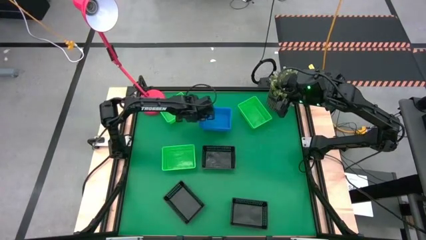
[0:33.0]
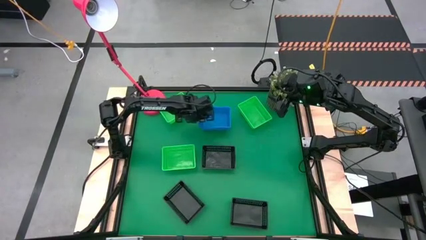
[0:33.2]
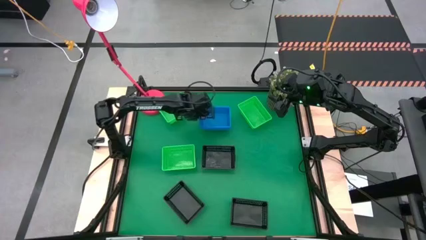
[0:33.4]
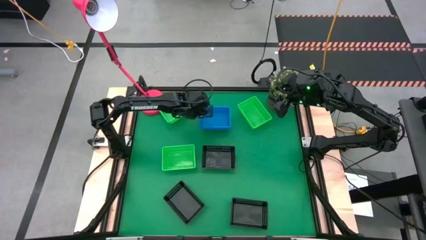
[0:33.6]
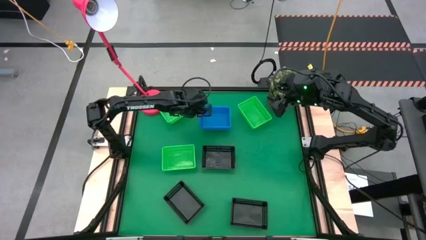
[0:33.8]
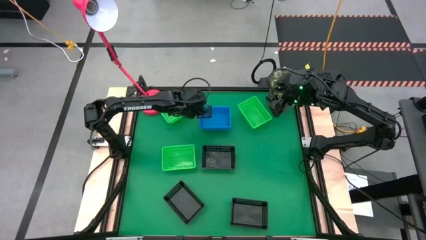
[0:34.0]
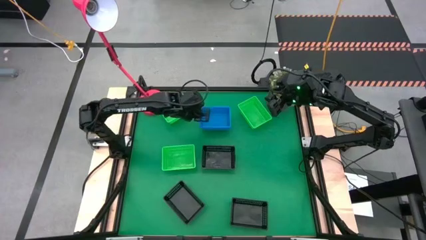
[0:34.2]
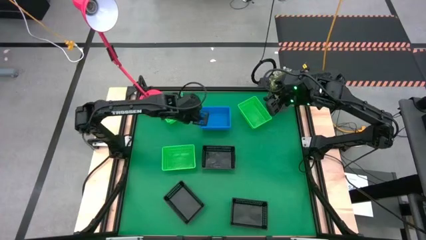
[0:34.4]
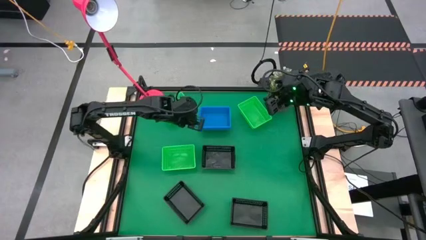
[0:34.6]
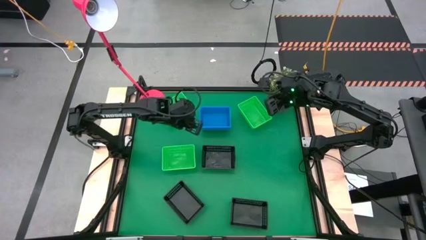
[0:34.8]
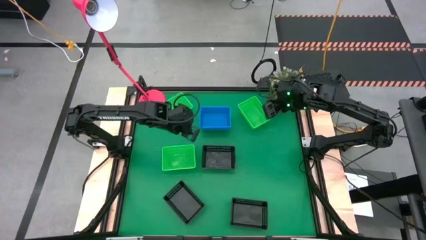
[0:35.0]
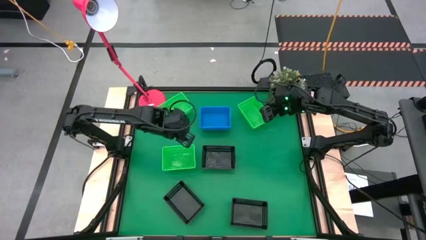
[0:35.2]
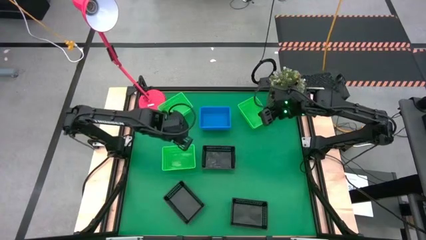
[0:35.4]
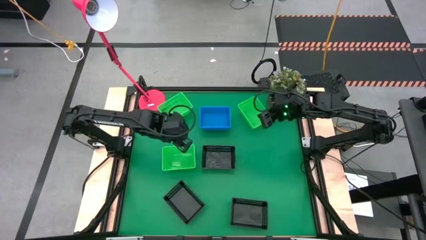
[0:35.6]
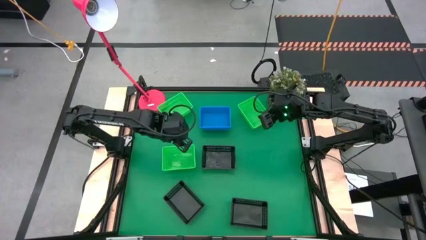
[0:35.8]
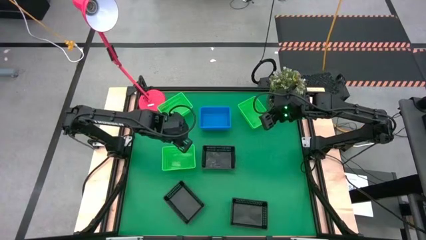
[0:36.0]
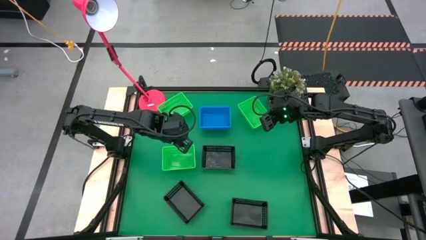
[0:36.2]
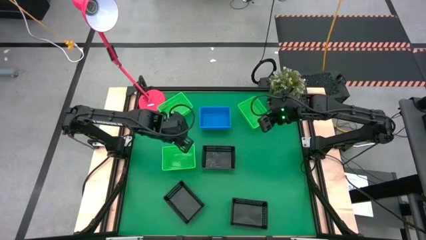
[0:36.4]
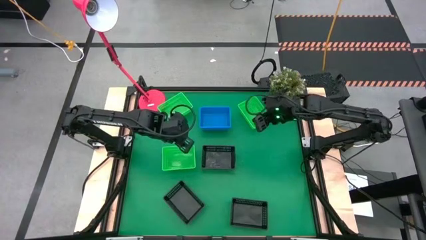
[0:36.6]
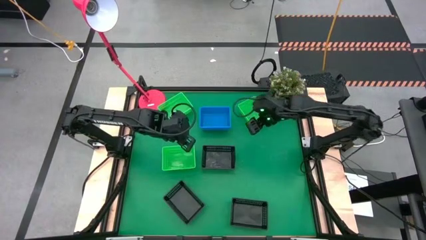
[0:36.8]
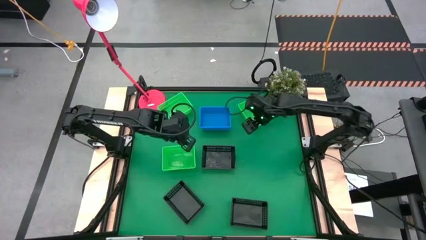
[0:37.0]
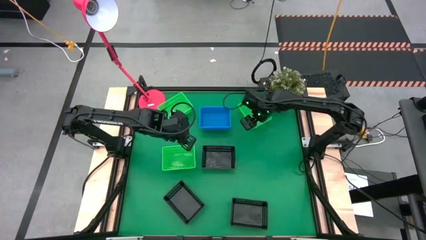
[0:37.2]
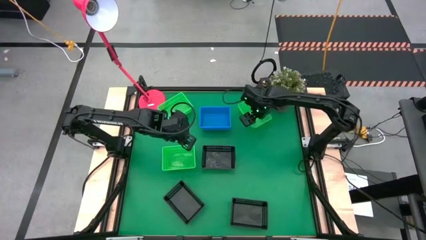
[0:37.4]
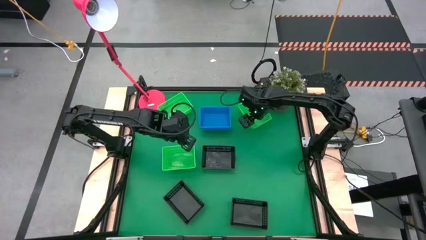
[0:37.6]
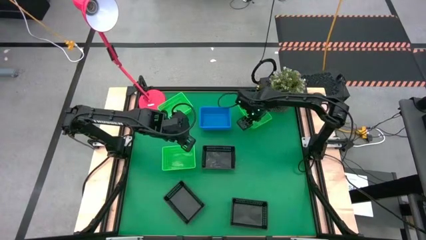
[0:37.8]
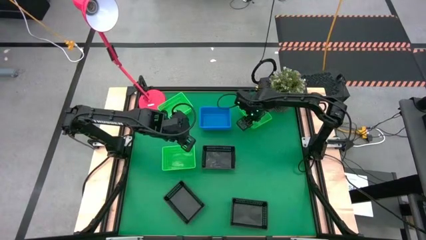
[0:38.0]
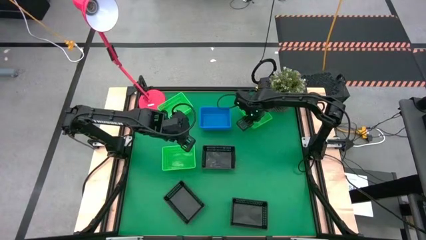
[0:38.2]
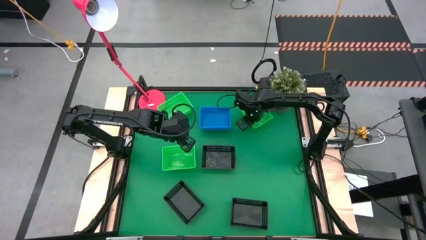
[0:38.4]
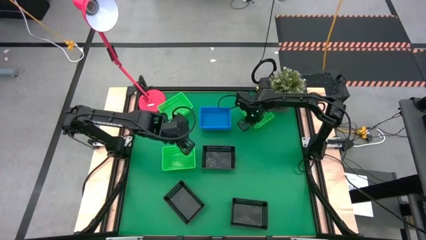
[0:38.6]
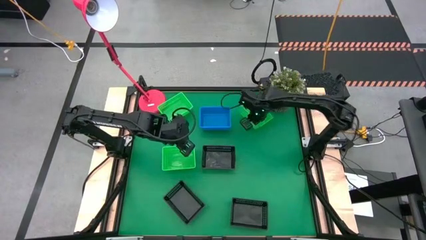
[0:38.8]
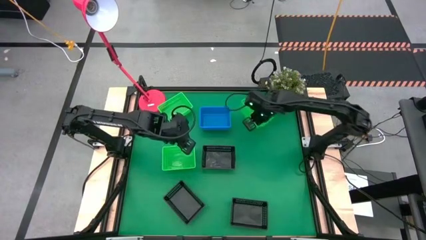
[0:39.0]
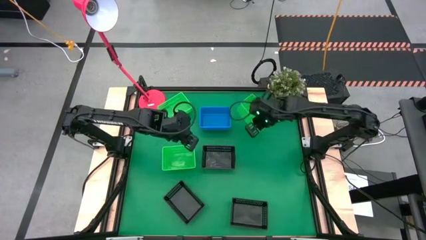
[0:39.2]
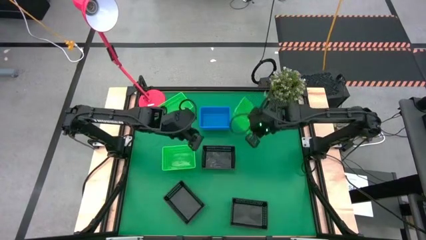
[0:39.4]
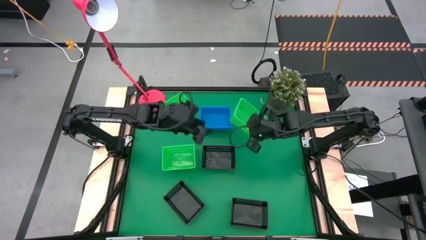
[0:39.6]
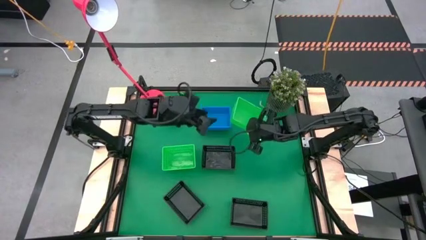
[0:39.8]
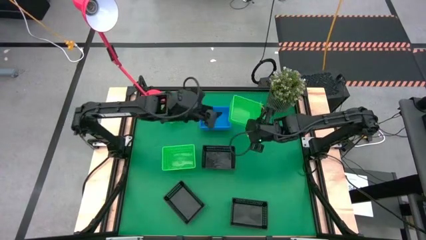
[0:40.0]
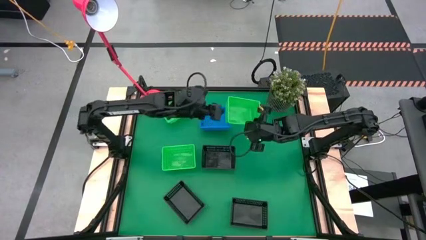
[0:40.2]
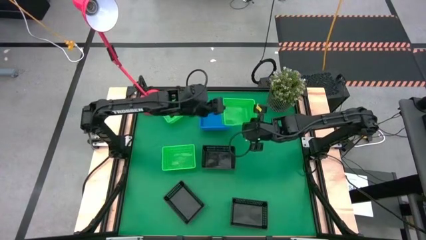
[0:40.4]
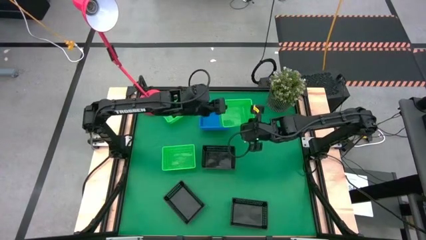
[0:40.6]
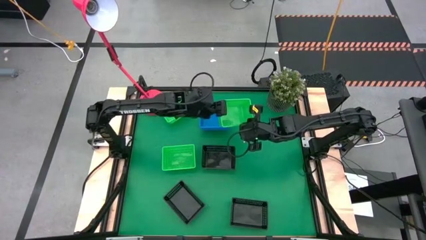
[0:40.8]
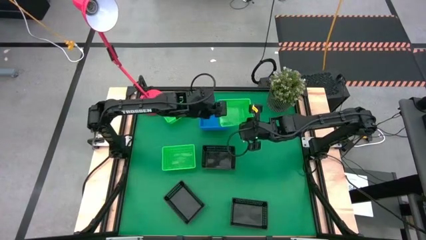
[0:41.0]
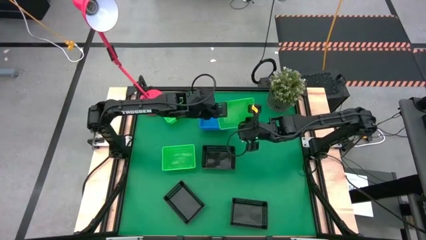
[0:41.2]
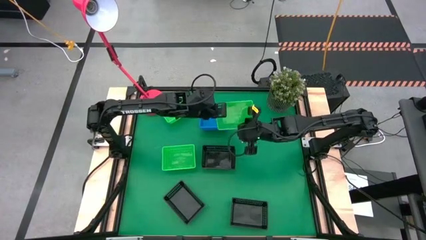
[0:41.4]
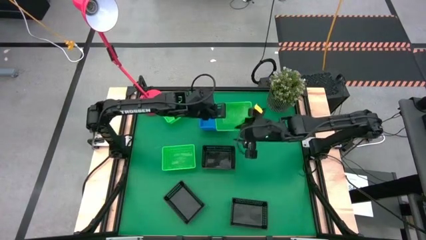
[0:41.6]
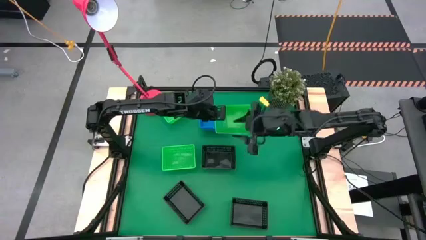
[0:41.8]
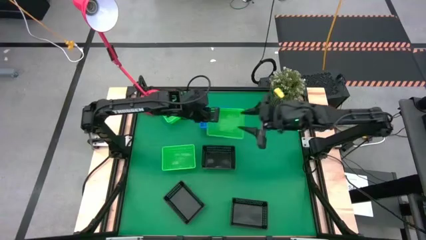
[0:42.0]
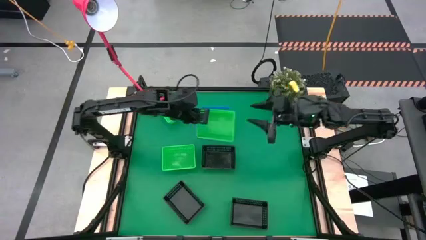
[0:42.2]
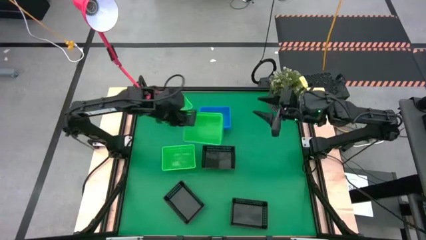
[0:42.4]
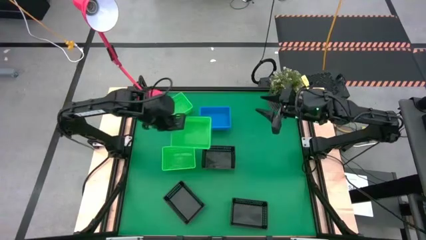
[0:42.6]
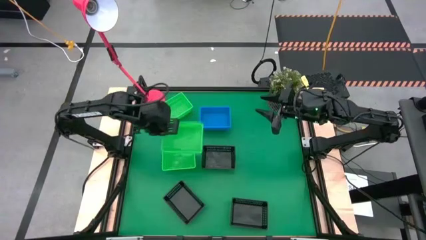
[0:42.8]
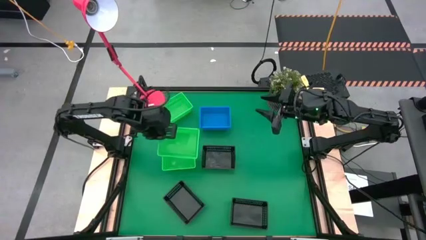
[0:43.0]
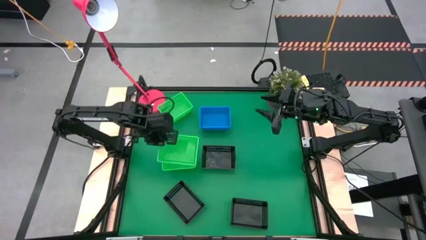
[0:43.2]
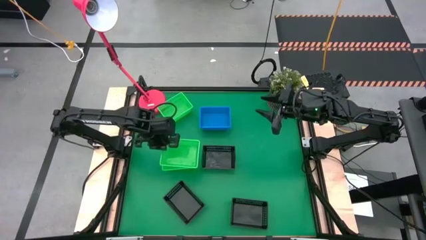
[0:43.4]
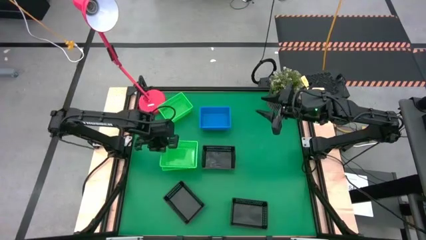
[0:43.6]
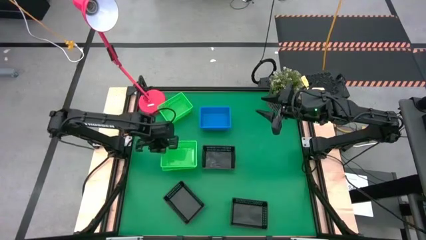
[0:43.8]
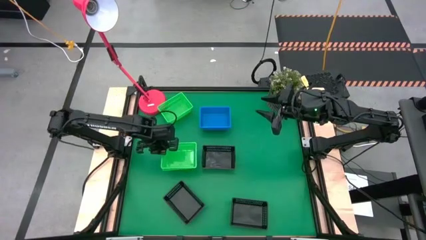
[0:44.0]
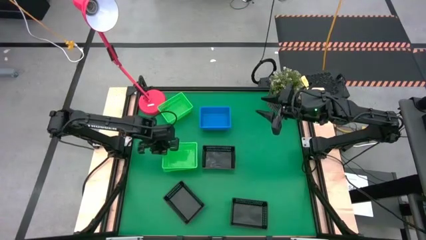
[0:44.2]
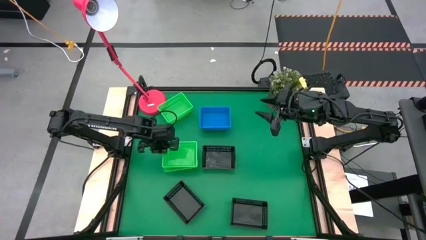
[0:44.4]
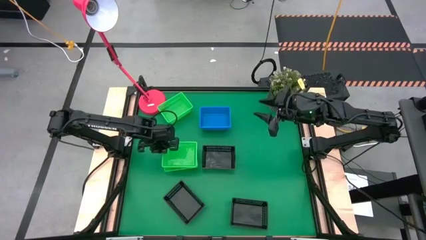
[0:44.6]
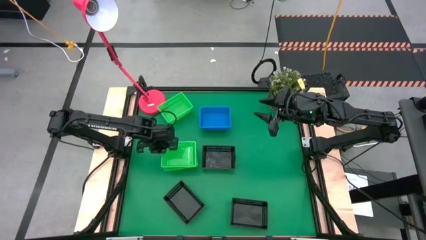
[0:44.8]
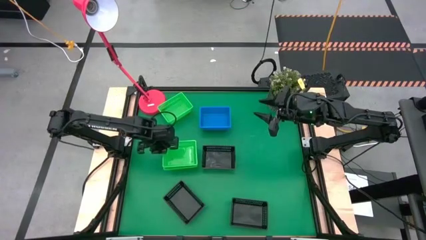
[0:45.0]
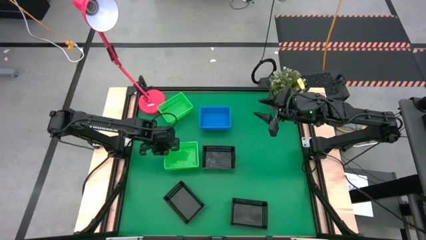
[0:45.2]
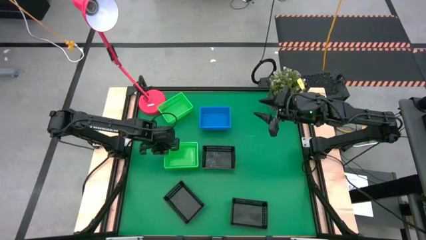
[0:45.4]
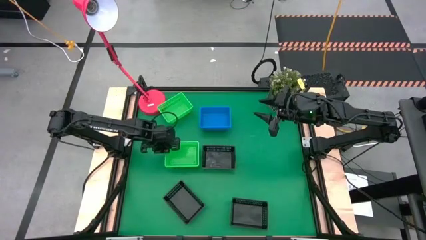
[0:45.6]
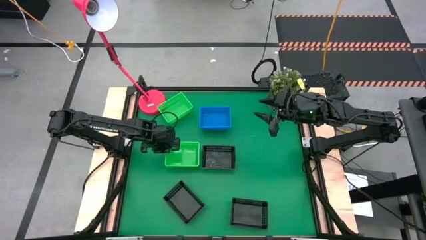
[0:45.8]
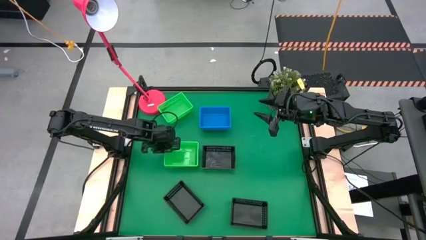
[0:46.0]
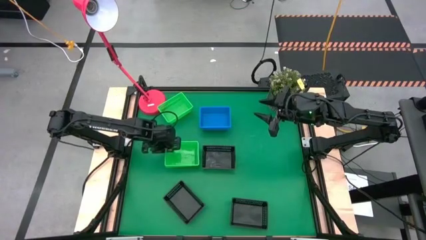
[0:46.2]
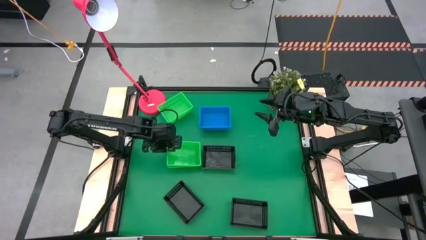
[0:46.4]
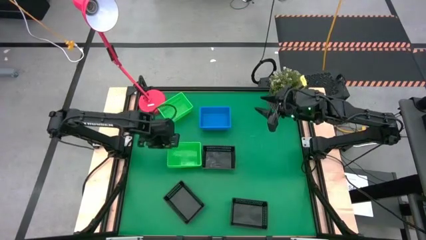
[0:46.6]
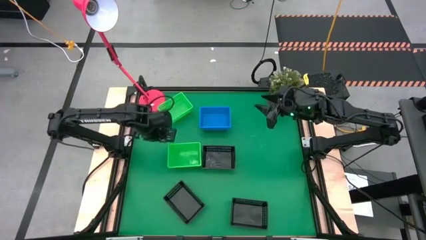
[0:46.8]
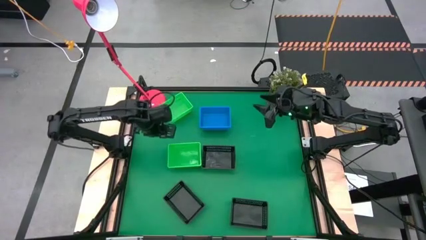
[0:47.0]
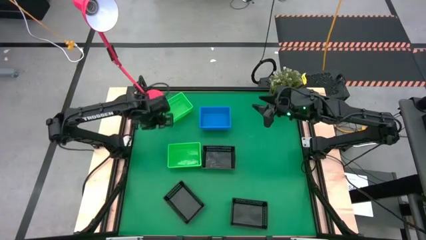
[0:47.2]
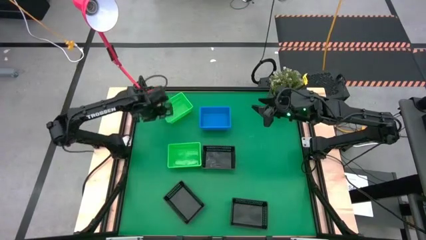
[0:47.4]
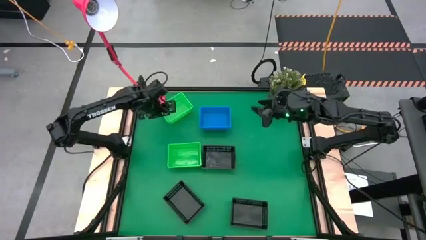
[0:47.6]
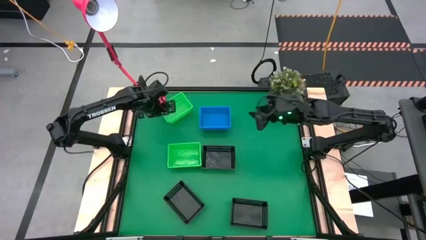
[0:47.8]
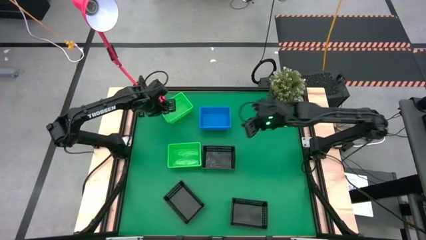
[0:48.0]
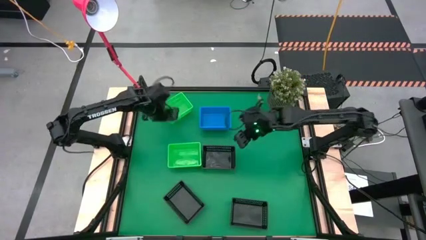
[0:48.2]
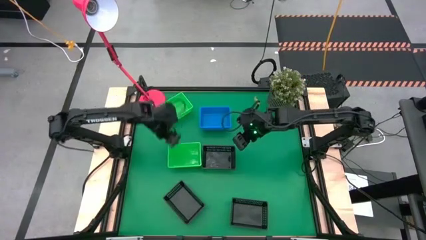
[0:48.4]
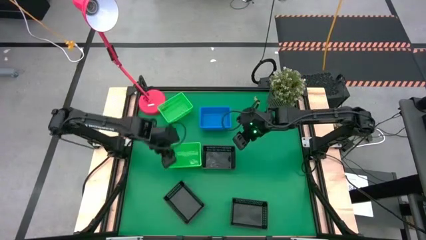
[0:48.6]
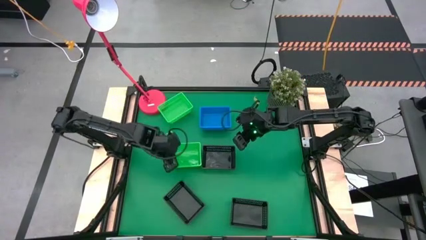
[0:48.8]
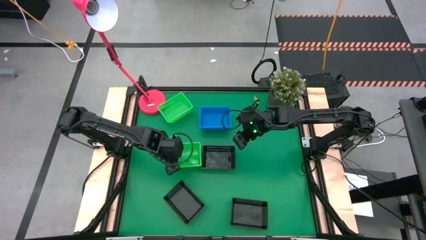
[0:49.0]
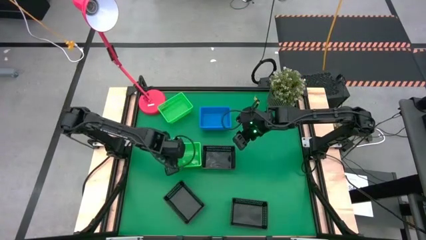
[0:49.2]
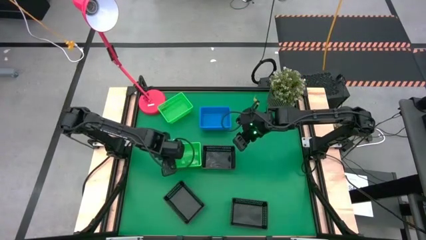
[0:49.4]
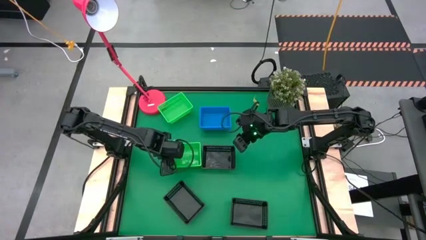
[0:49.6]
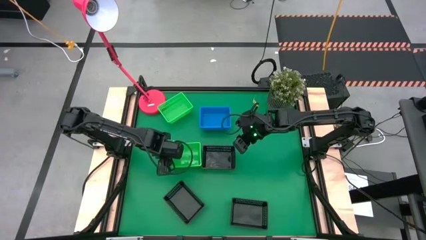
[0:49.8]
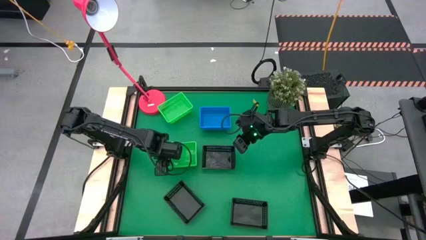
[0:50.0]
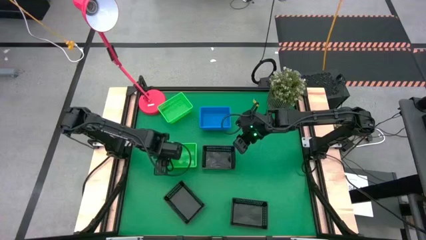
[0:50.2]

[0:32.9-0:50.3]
Stack the top right green bin on the top of the bottom green bin
